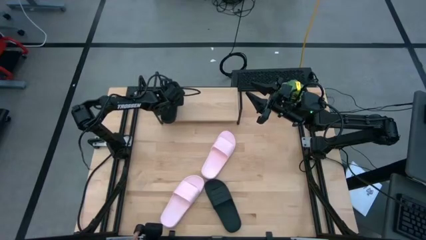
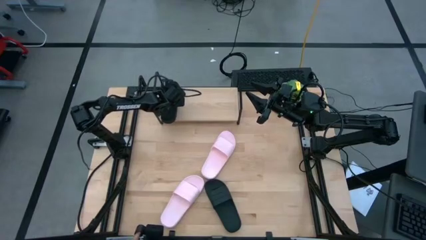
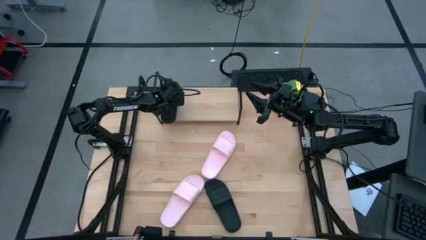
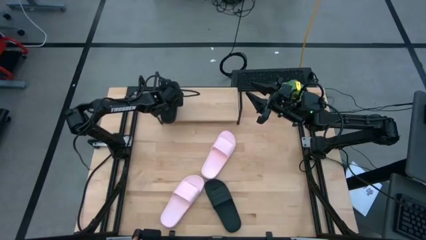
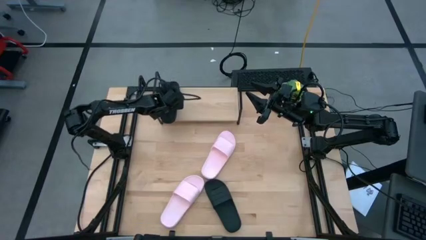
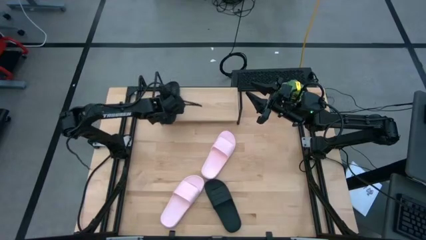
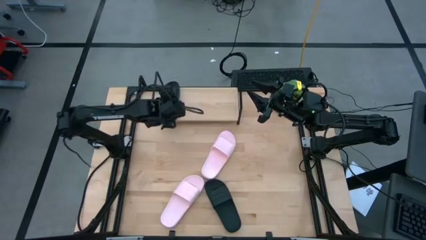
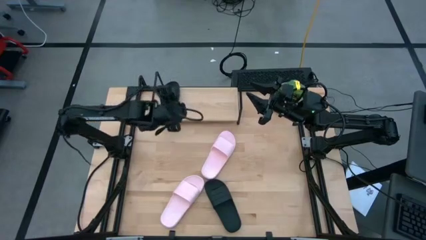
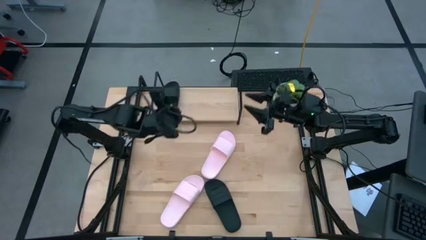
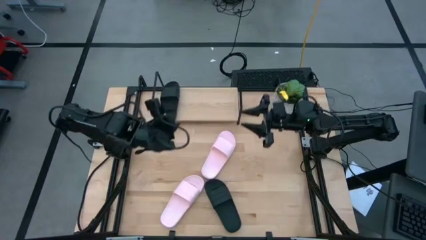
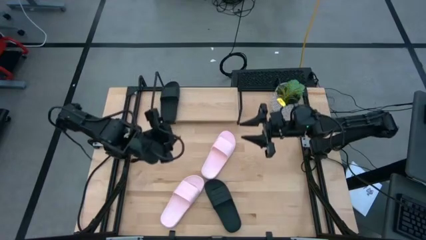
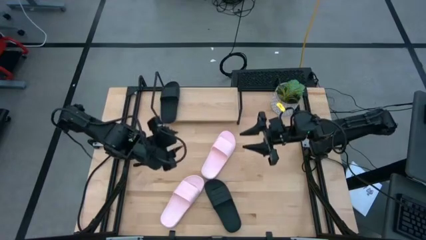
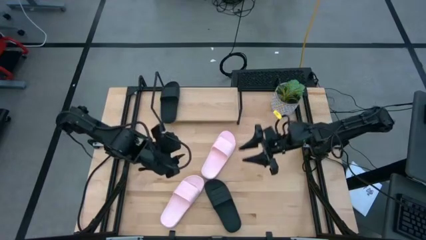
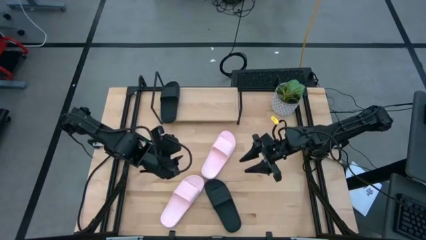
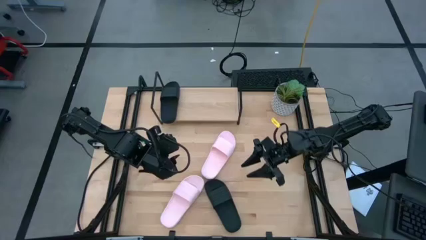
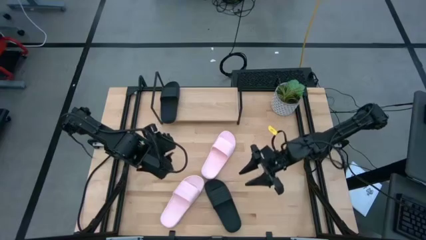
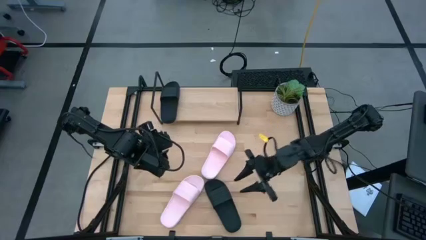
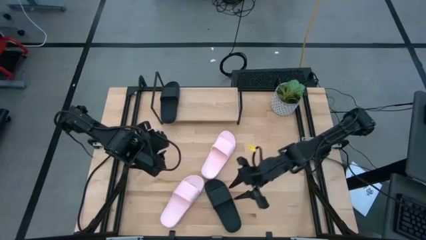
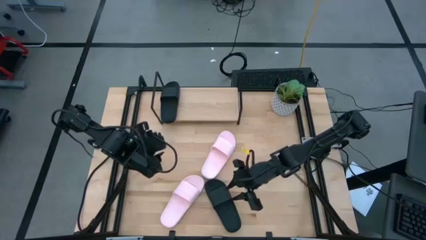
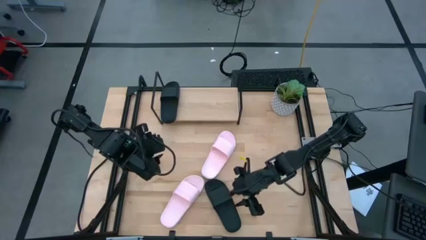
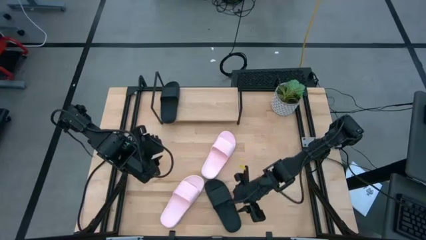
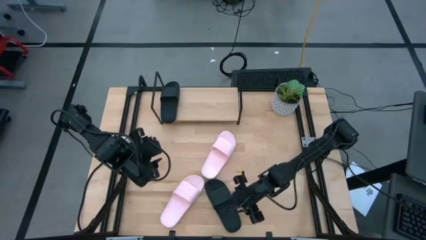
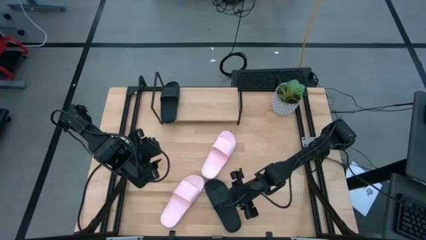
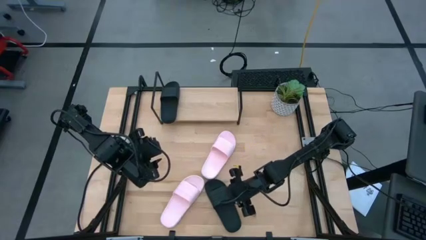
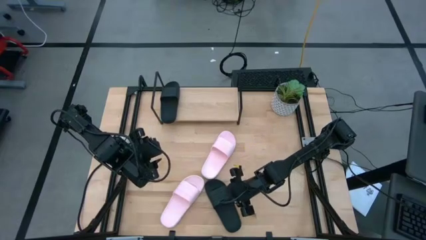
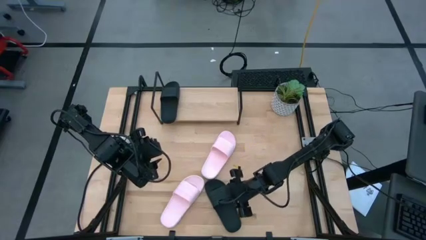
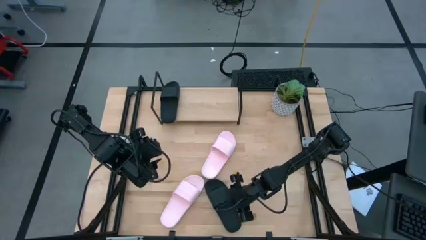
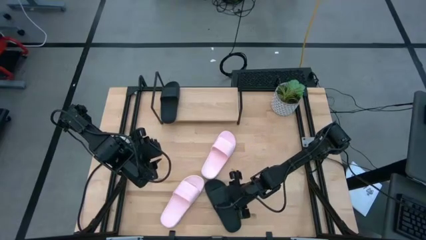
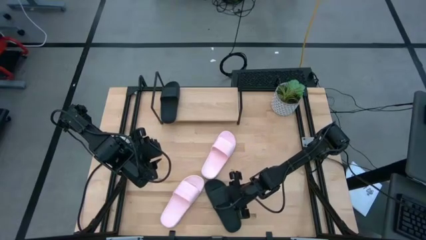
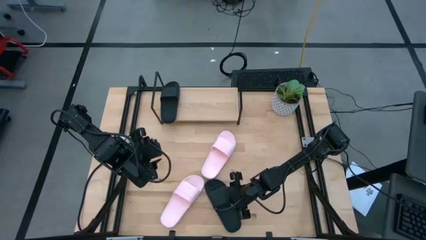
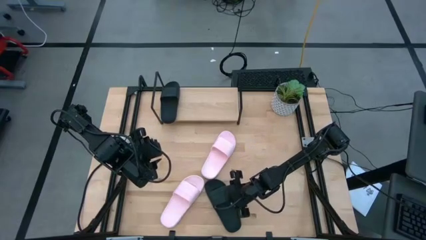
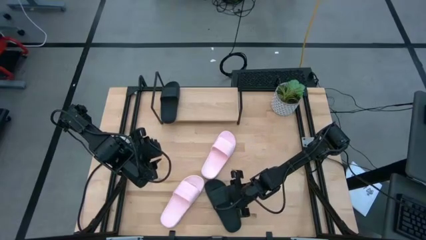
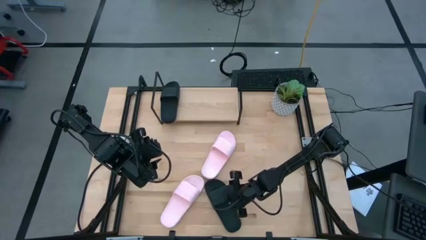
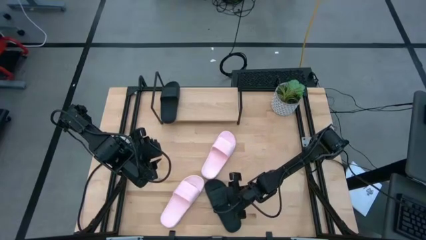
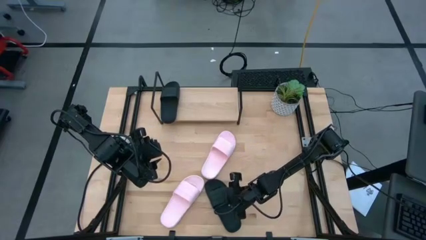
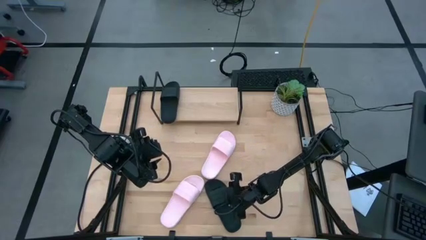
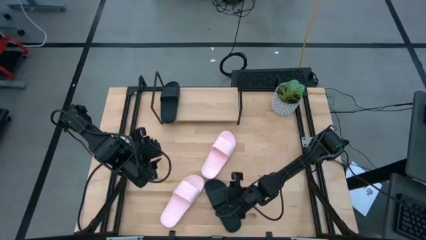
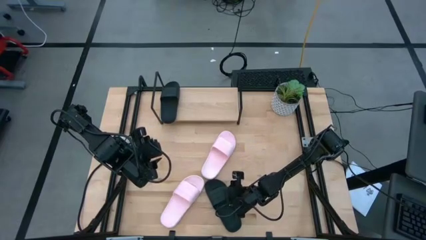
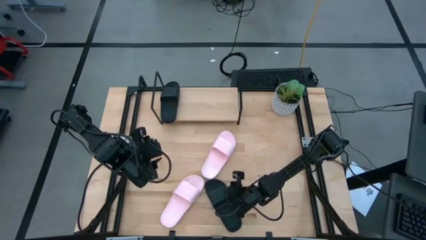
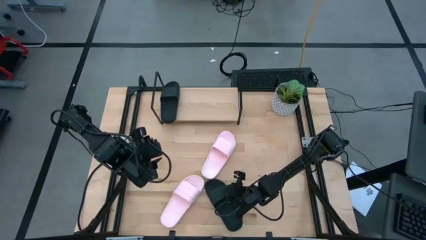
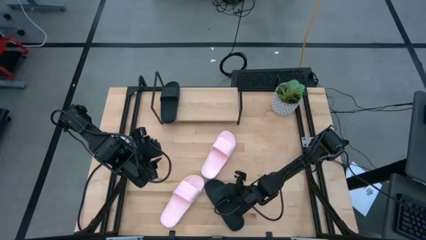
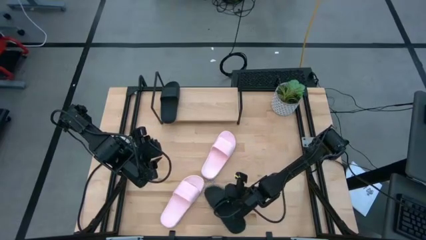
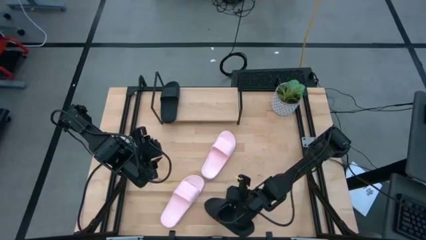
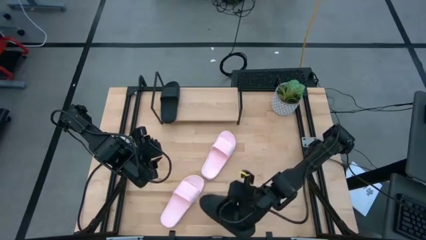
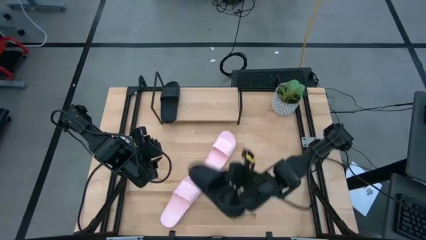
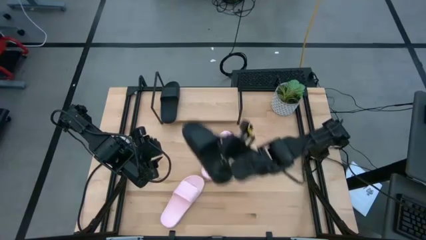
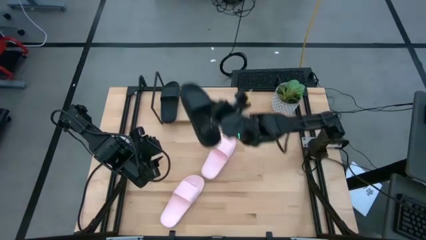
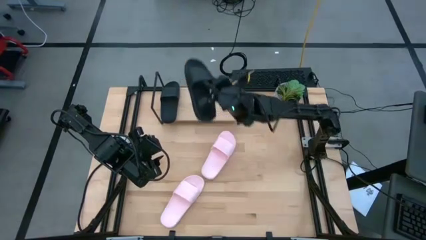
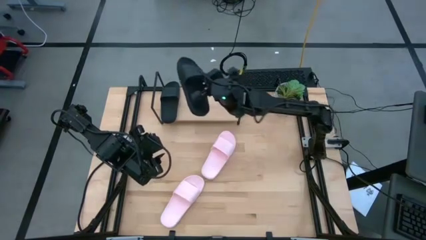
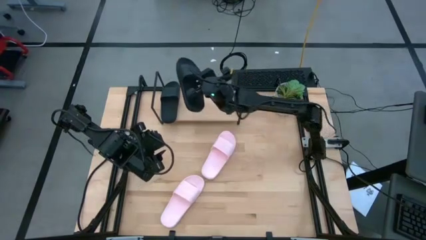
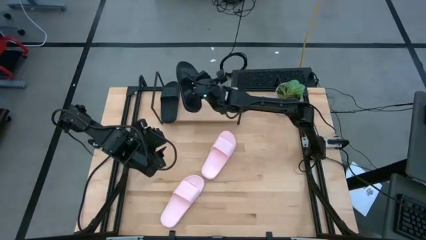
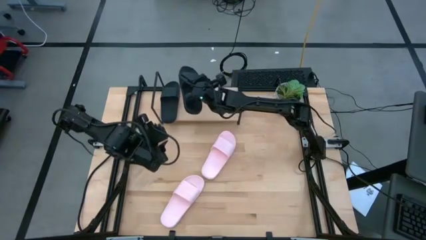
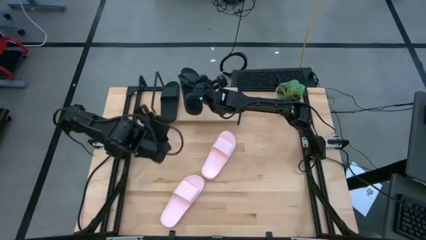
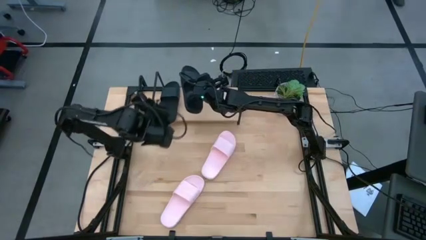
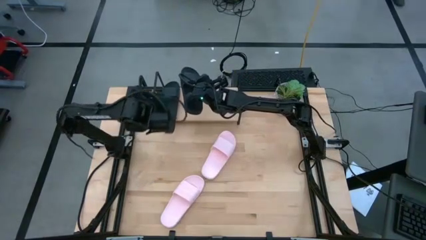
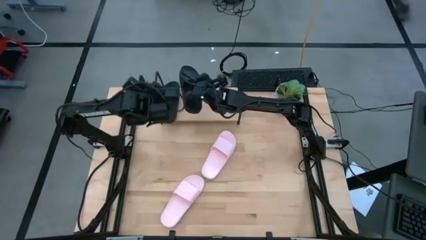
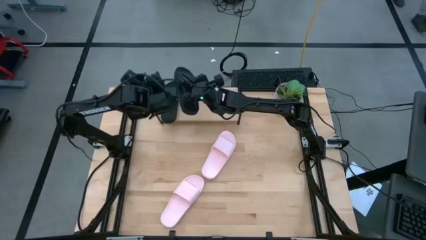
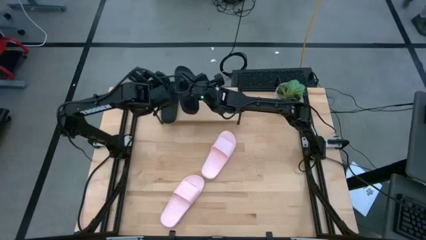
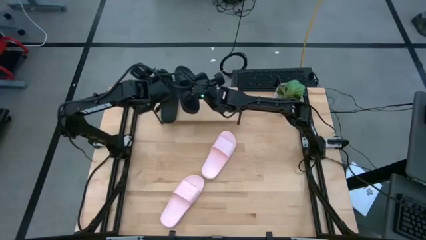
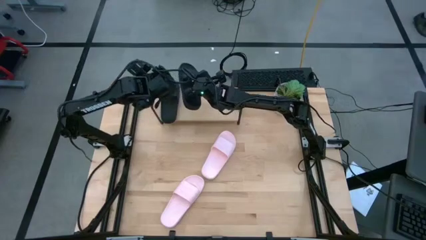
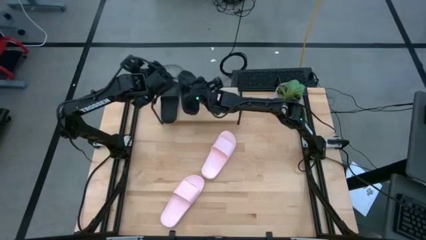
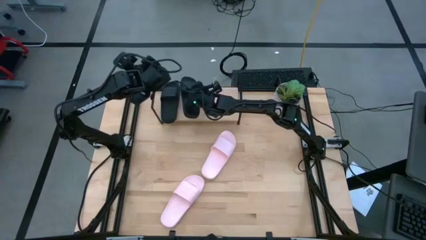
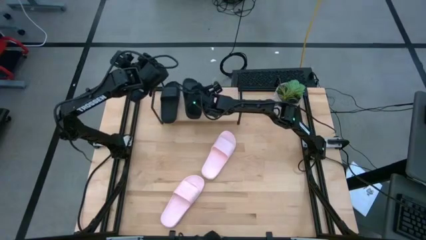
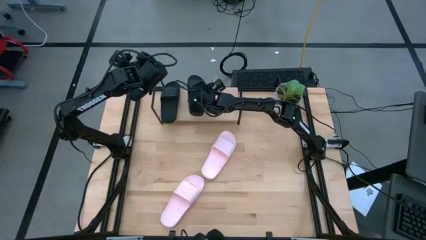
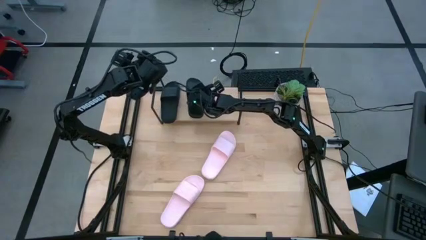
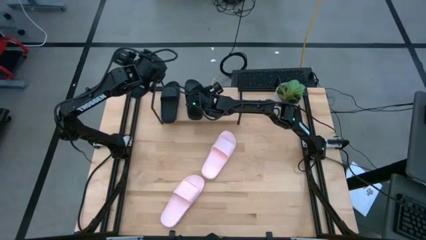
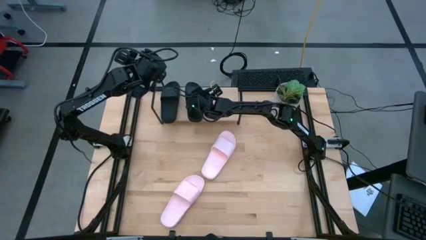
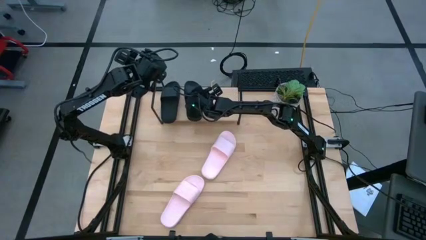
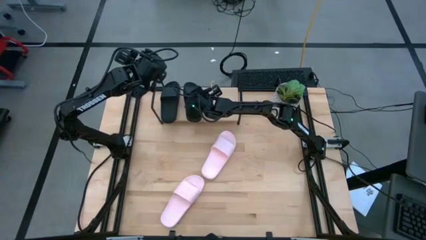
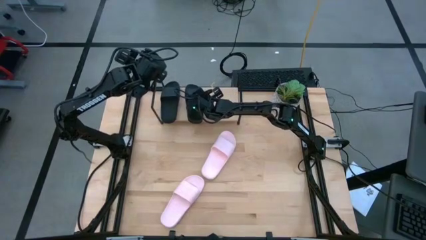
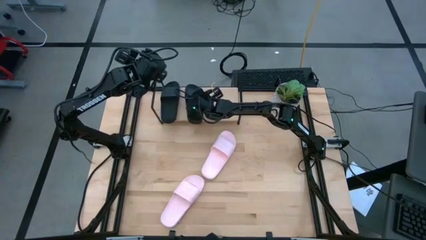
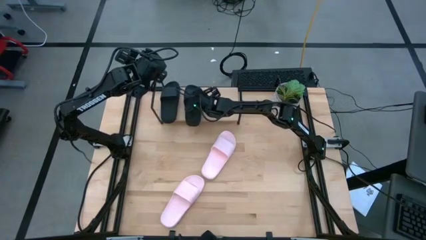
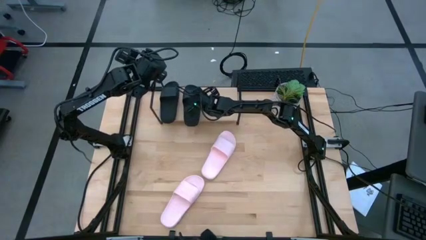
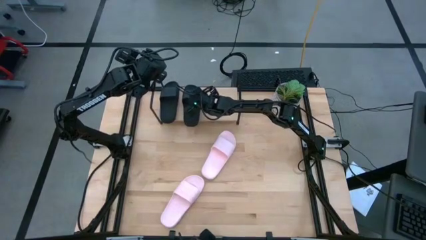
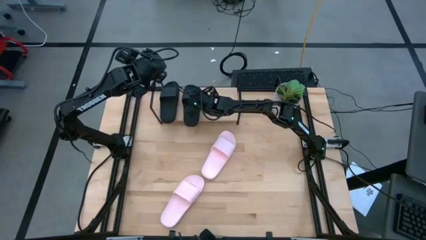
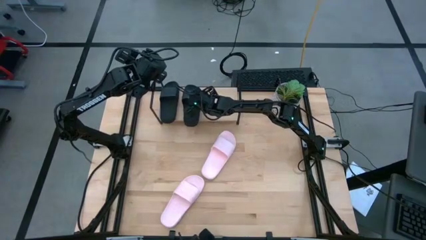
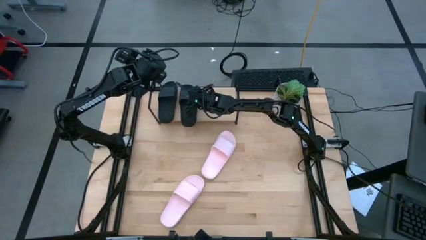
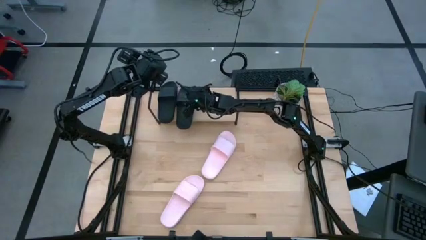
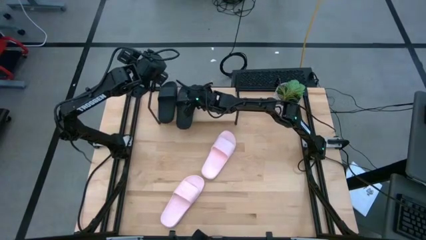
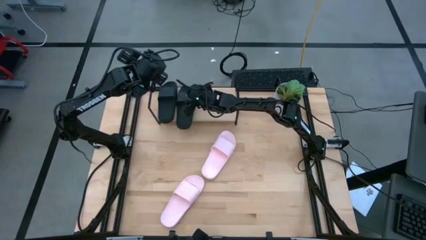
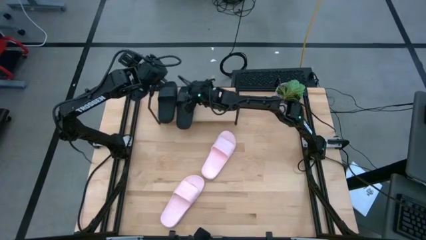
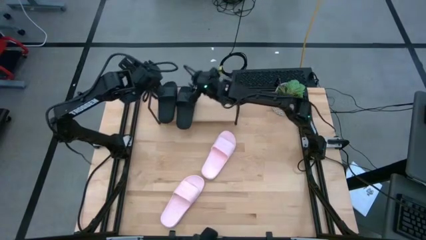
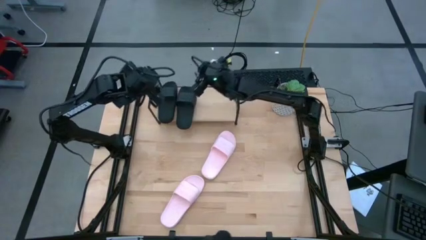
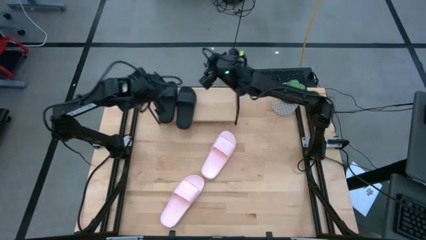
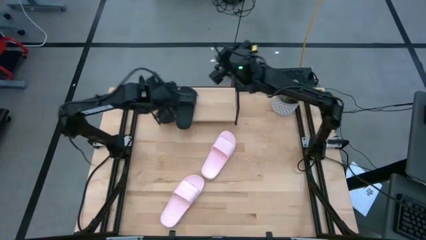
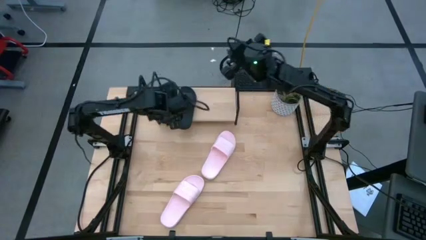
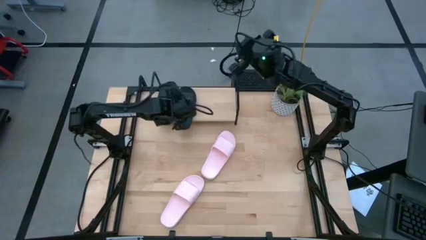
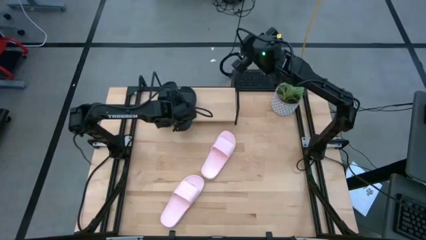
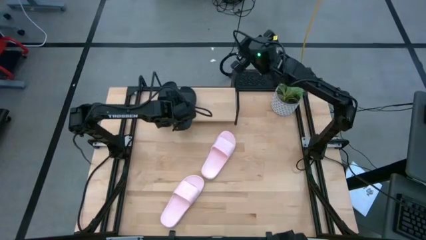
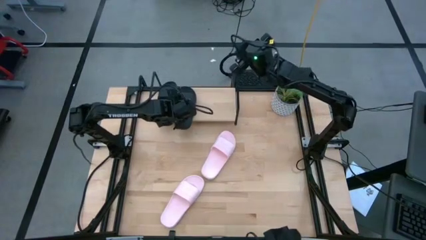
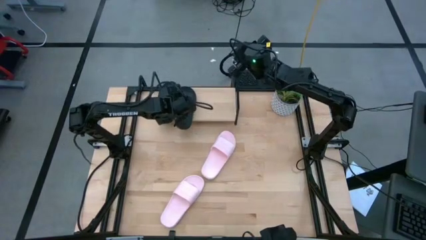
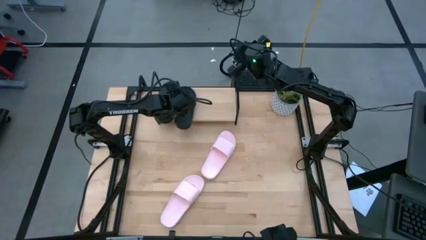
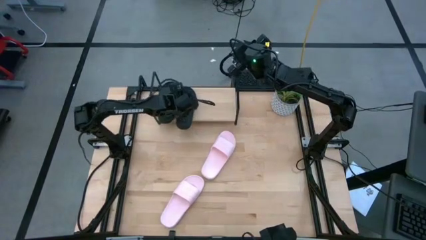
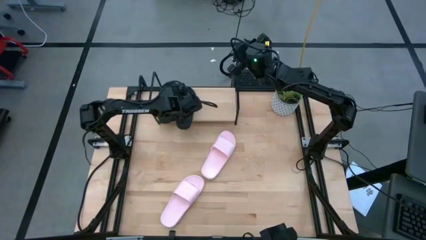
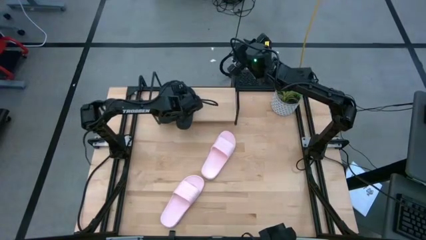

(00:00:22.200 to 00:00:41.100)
Task: Pick and place slides into the shelf
Put the black slipper on the shelf
